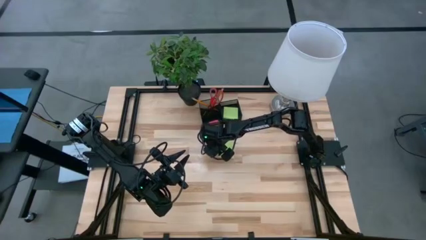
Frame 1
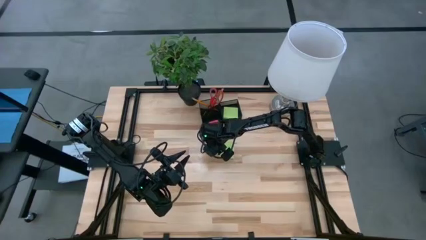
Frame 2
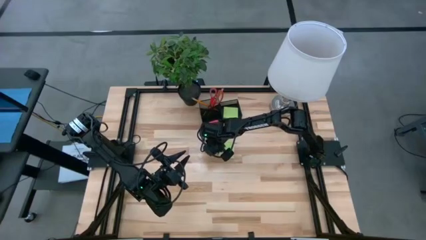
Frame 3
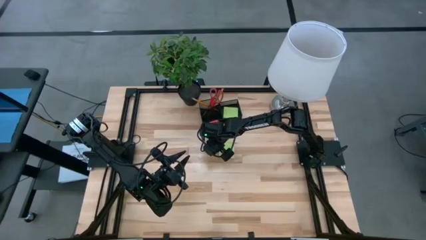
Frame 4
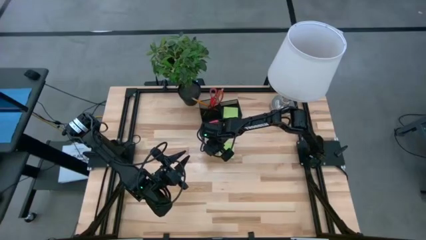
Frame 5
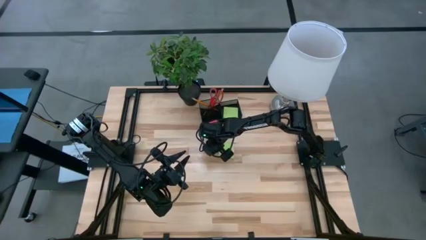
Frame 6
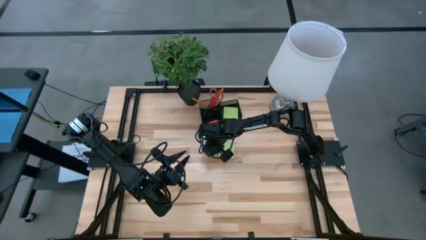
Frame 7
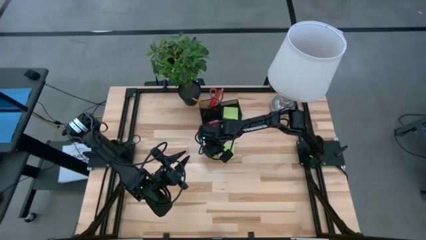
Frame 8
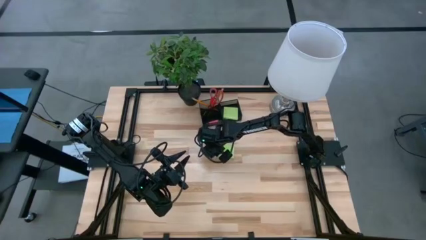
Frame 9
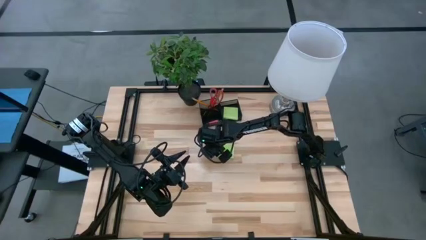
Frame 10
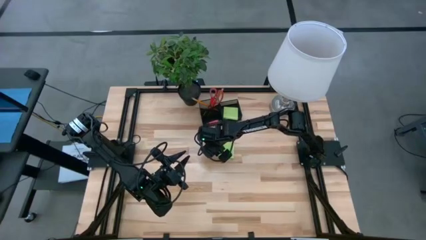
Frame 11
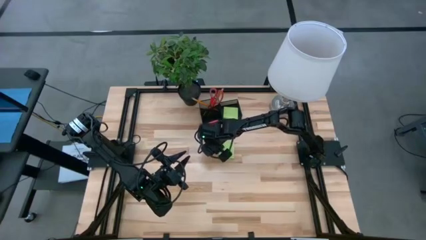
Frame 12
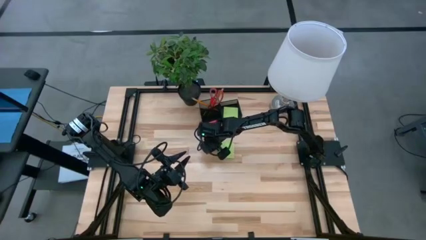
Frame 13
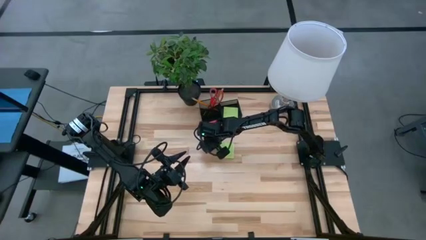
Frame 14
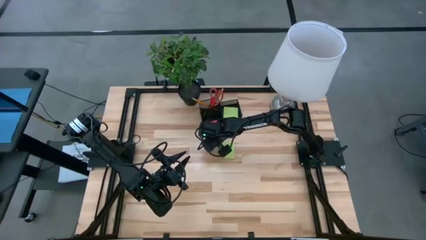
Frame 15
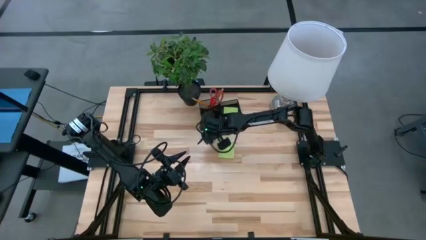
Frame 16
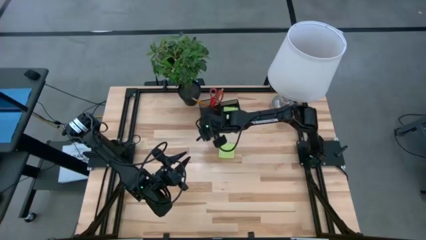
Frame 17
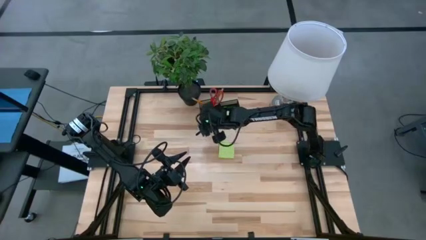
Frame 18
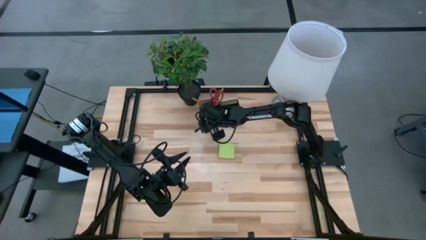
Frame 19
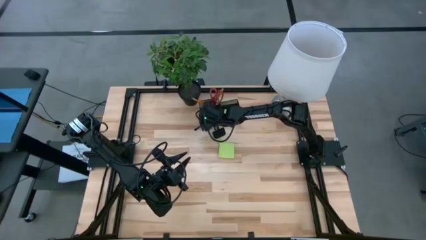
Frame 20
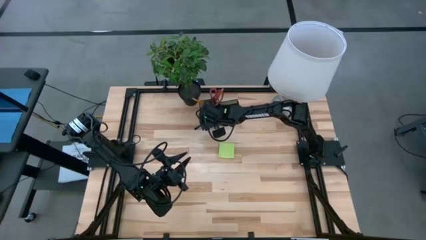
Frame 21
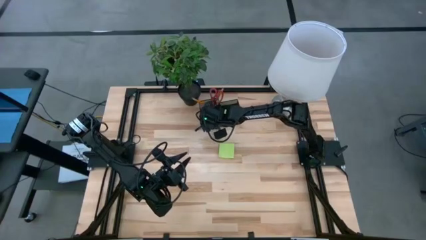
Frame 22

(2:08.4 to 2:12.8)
Task: Pick and place office supplies into organizer
Put the blue eraser into the desk organizer

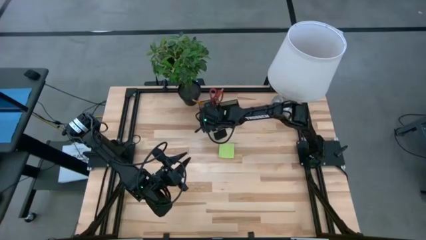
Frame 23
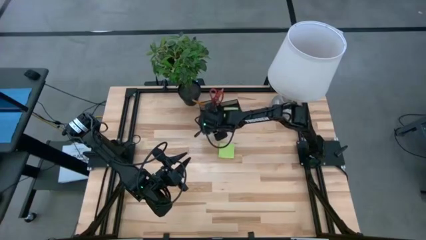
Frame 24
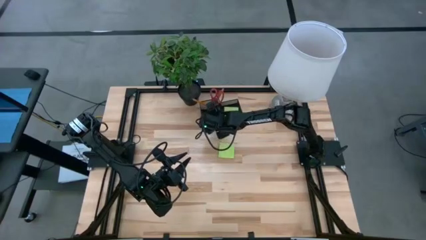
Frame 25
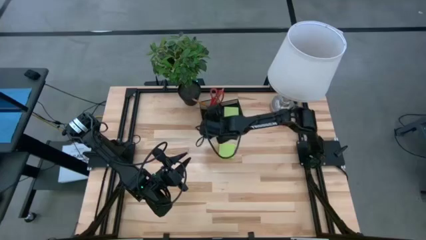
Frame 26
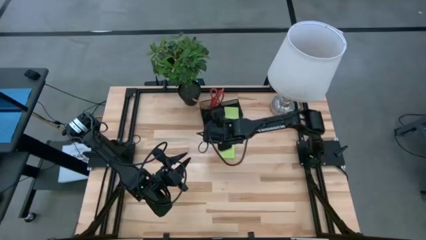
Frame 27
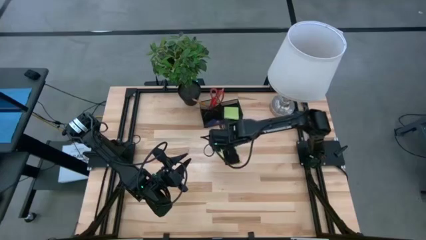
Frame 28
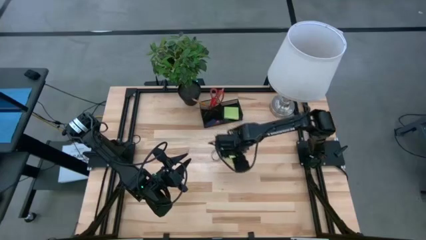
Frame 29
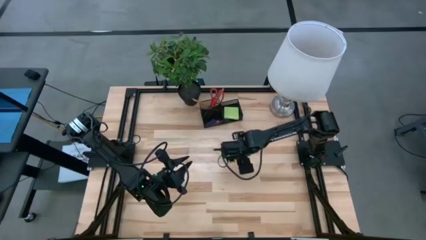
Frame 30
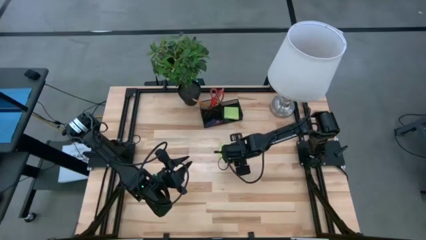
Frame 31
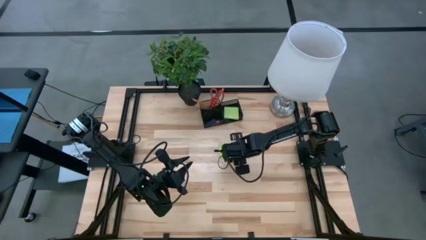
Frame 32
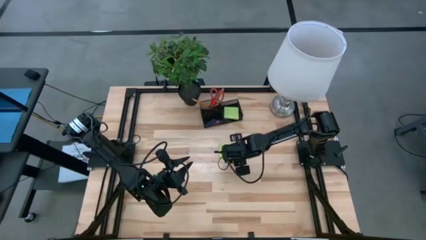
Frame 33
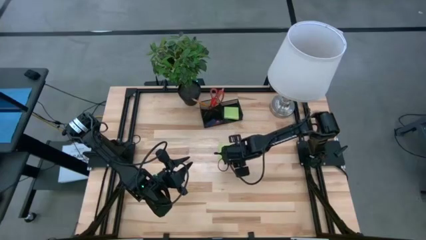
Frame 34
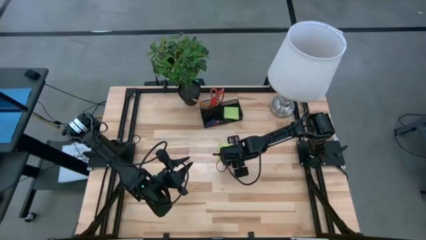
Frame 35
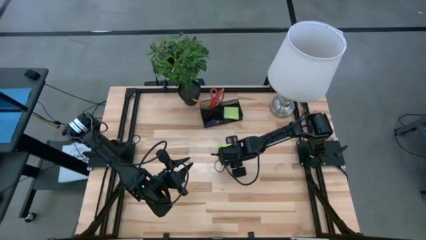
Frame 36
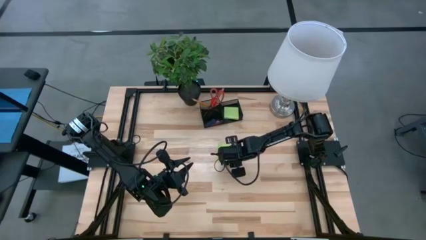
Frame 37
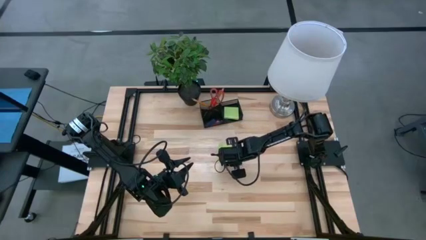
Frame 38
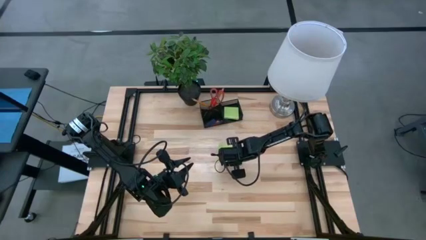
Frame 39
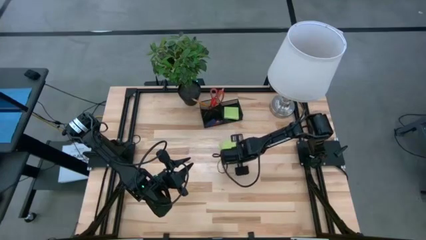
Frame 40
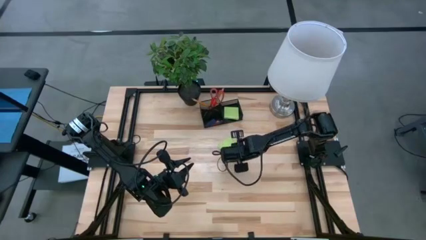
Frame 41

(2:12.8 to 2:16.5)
Put the green sticky note into the desk organizer

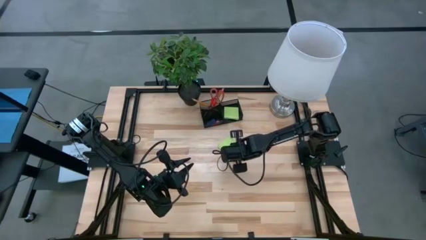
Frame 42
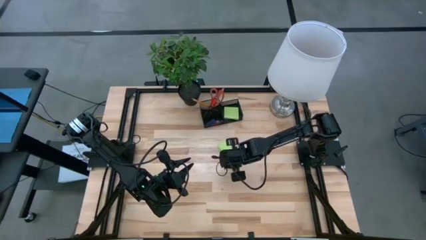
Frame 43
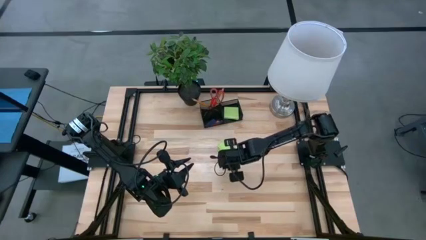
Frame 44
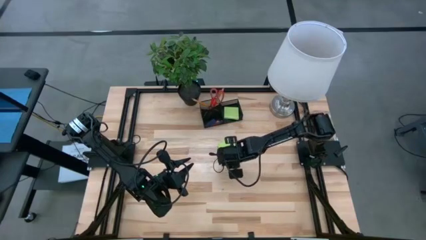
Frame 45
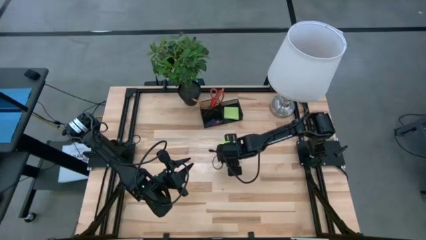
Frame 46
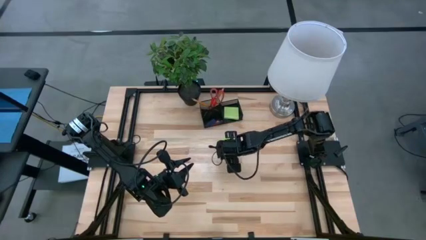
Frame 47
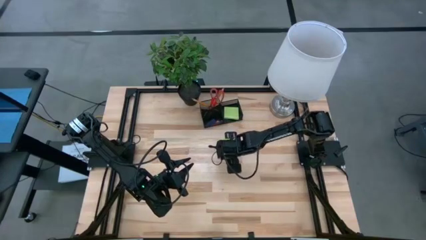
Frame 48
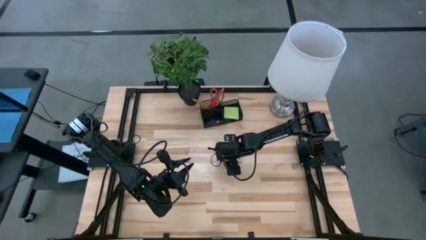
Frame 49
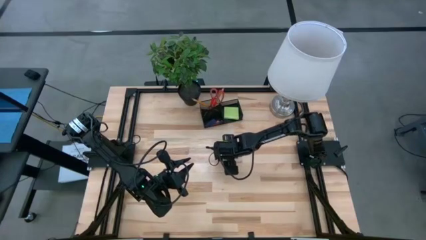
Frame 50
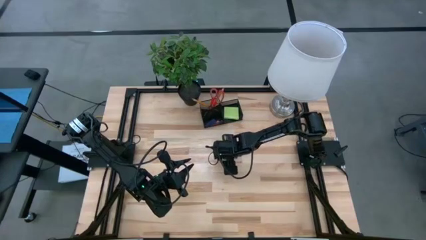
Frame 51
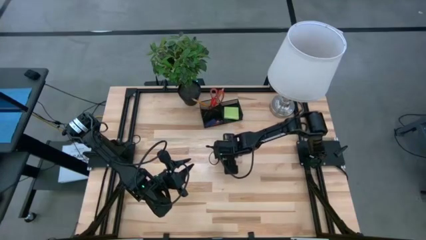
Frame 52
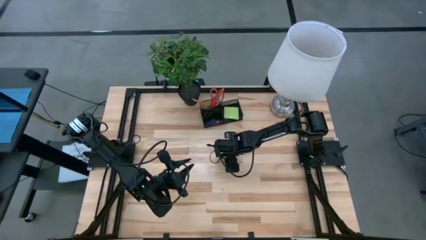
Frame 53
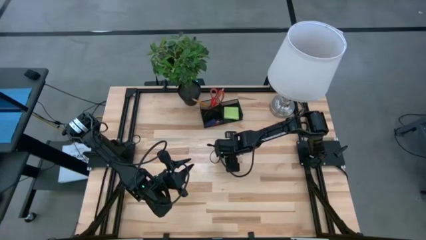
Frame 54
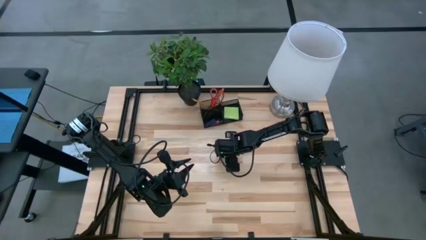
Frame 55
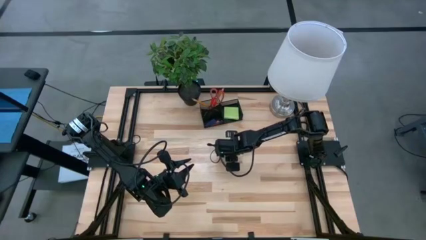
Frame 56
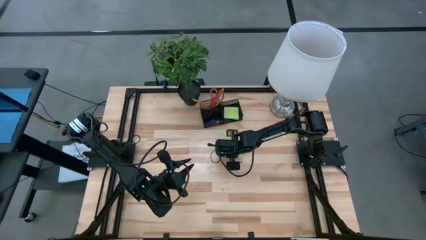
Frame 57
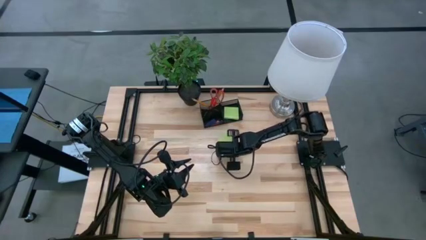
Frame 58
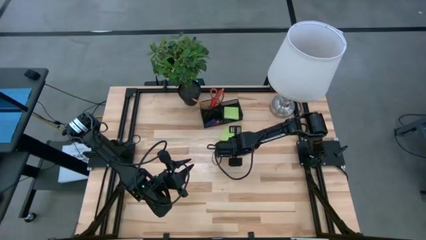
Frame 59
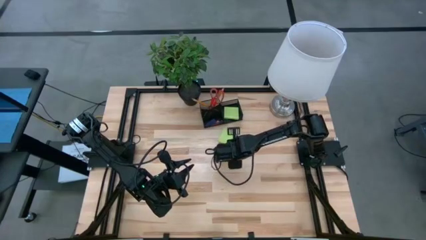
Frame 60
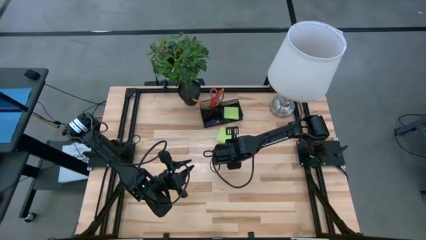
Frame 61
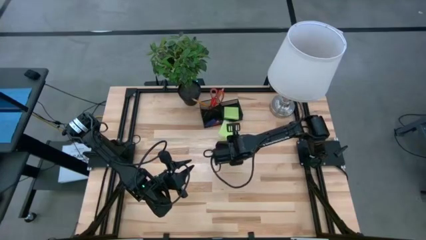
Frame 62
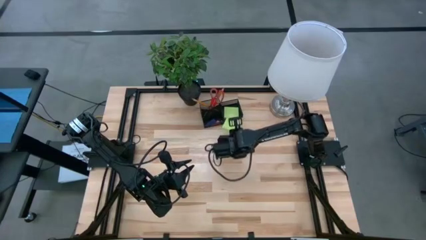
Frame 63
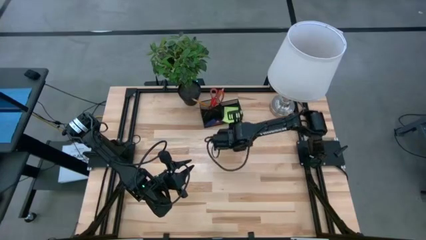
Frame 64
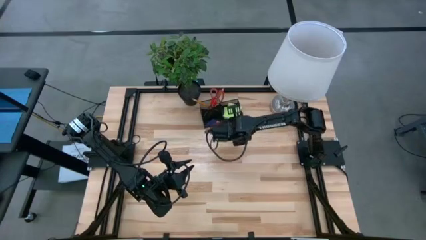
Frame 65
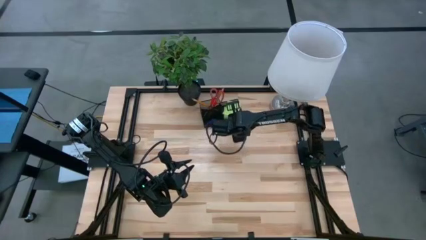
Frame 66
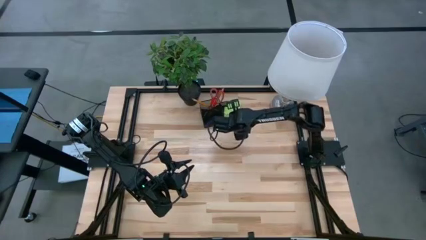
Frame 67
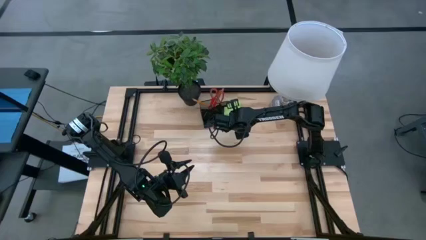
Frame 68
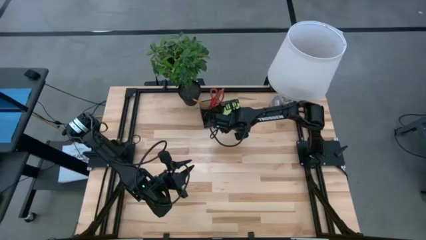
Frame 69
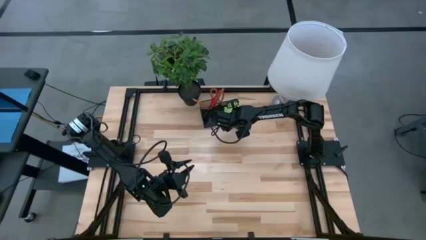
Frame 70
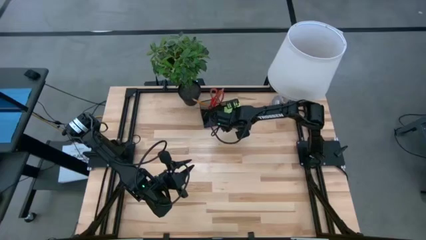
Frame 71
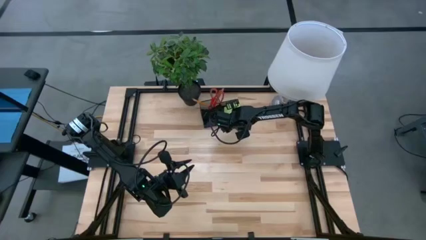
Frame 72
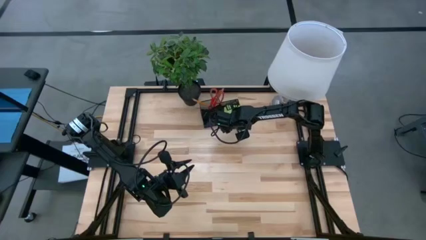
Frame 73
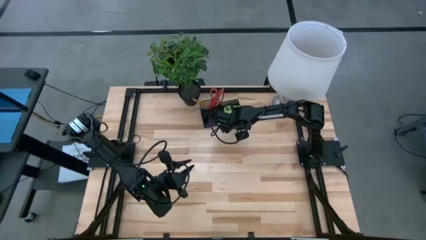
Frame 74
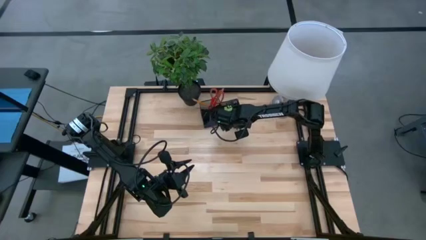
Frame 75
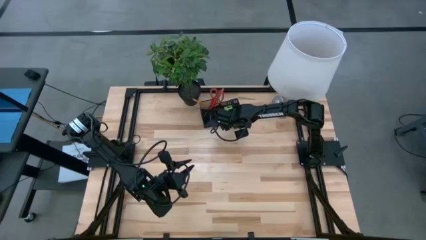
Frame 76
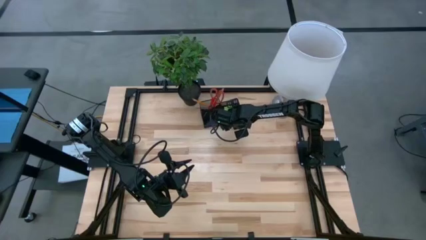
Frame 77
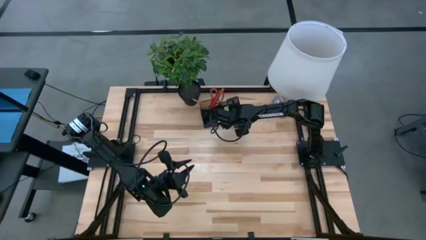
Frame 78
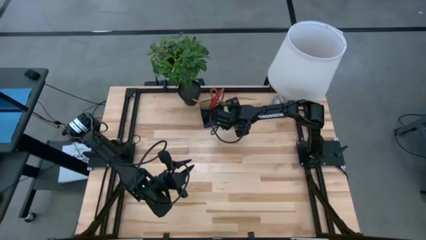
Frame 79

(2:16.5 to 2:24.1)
Put the green sticky note into the desk organizer
